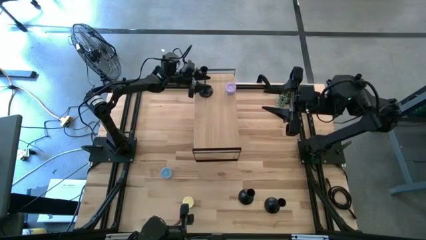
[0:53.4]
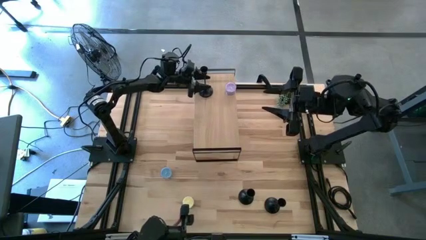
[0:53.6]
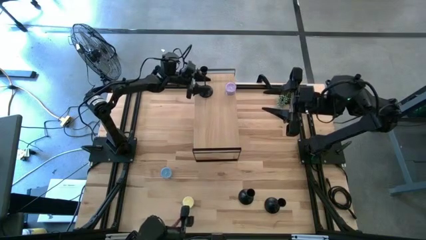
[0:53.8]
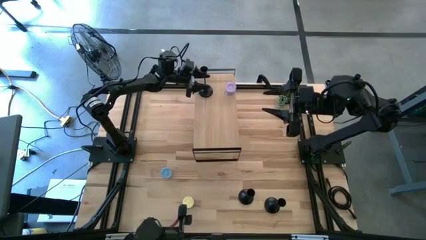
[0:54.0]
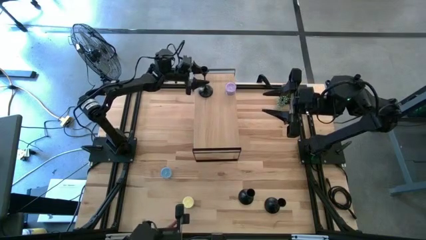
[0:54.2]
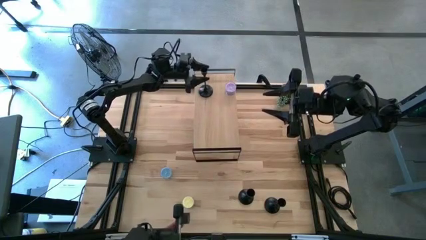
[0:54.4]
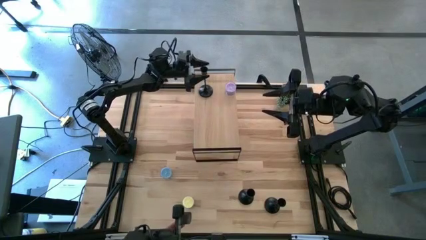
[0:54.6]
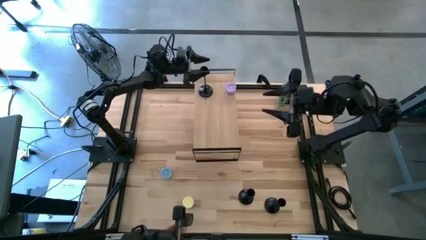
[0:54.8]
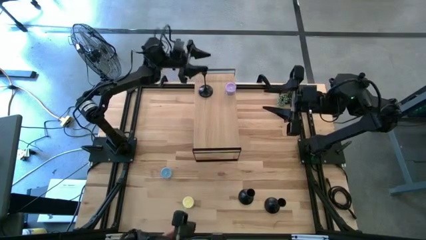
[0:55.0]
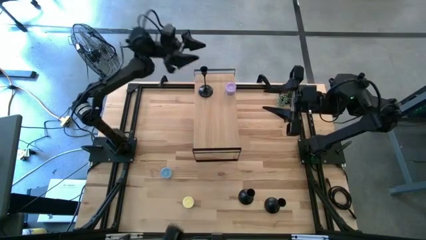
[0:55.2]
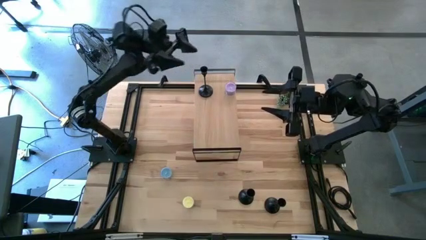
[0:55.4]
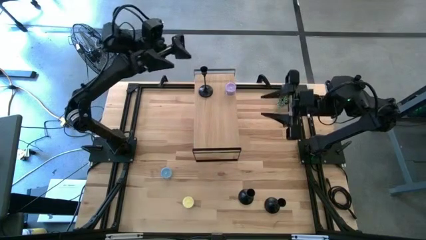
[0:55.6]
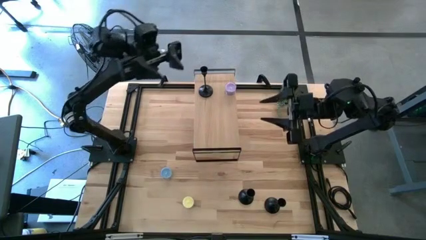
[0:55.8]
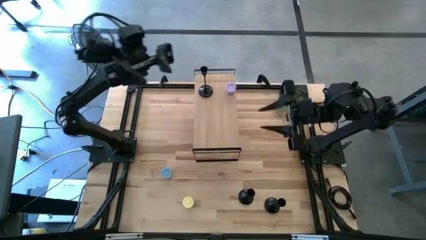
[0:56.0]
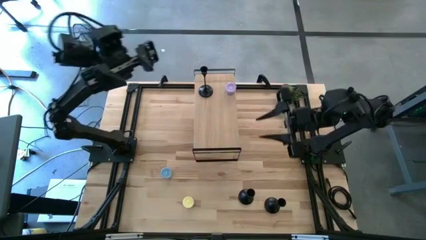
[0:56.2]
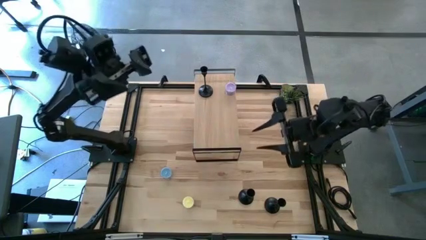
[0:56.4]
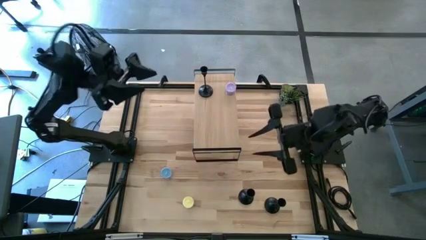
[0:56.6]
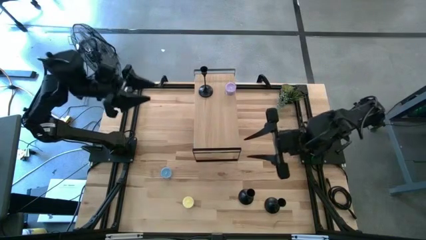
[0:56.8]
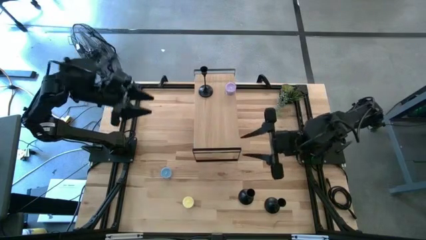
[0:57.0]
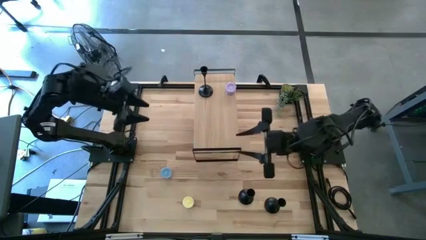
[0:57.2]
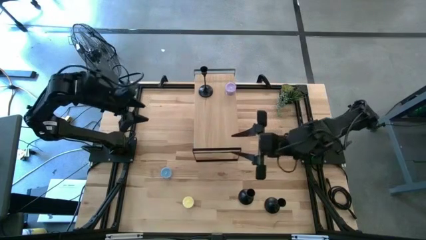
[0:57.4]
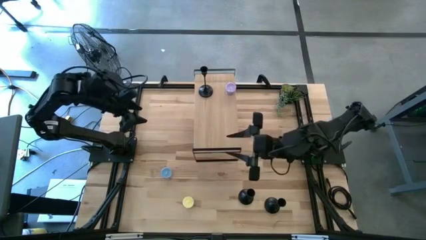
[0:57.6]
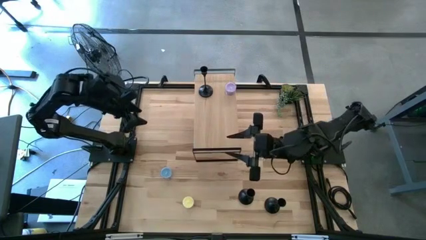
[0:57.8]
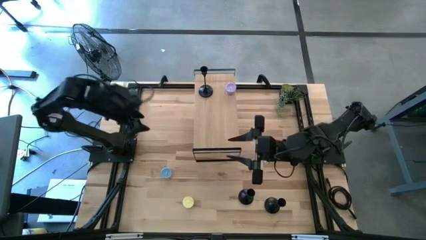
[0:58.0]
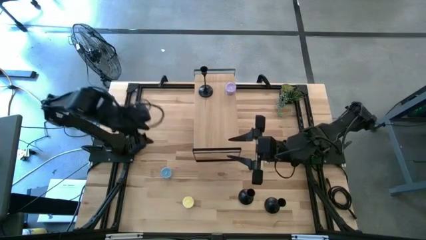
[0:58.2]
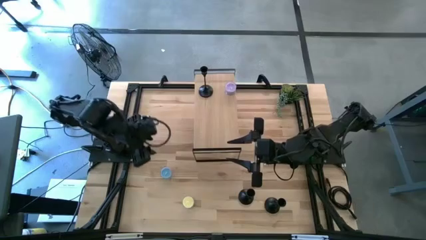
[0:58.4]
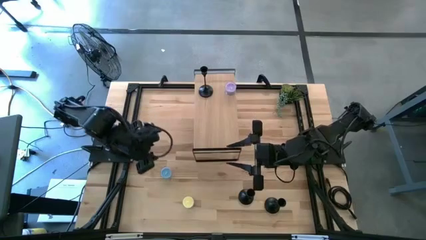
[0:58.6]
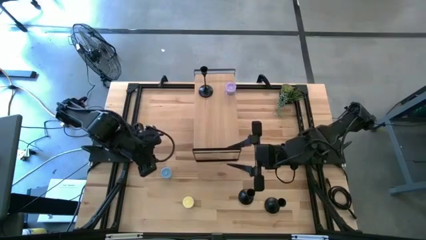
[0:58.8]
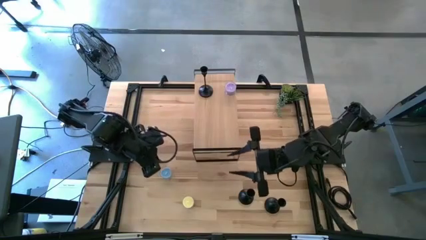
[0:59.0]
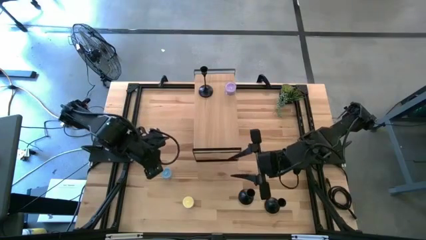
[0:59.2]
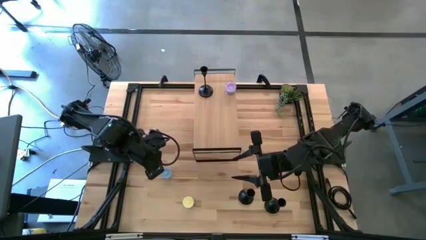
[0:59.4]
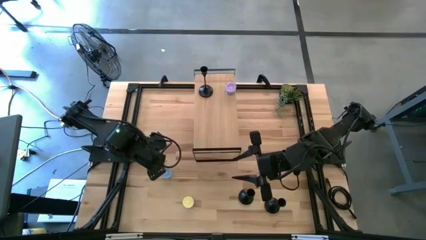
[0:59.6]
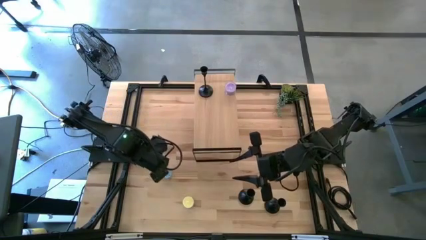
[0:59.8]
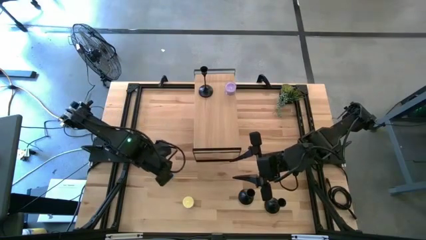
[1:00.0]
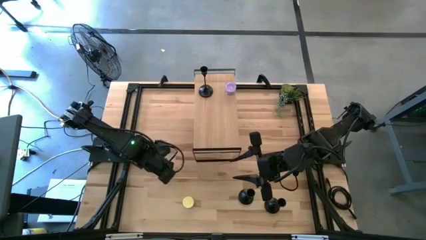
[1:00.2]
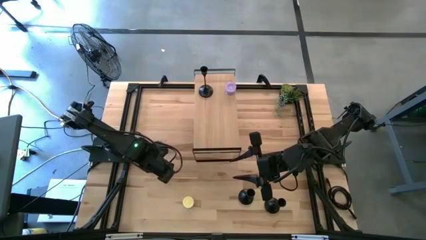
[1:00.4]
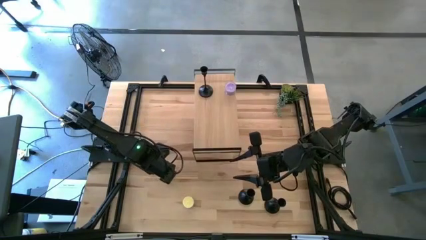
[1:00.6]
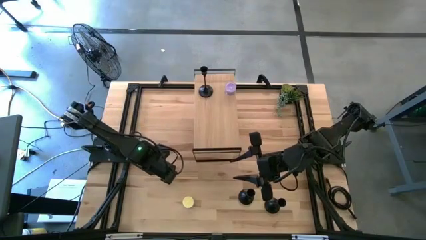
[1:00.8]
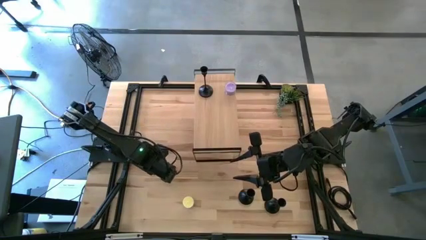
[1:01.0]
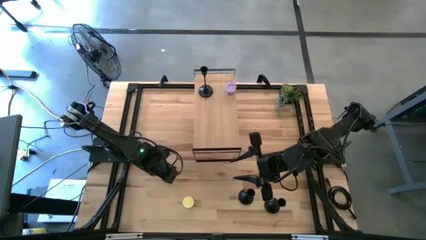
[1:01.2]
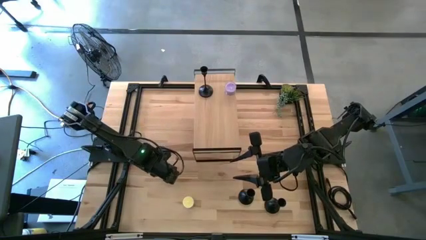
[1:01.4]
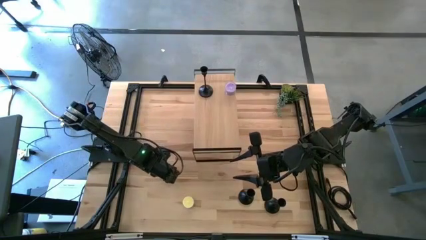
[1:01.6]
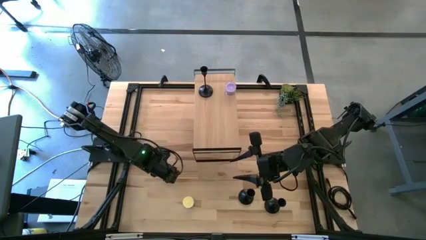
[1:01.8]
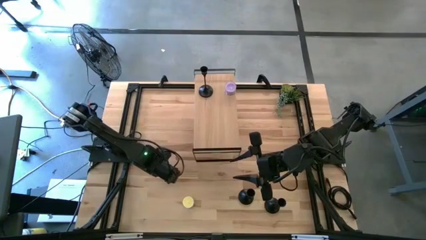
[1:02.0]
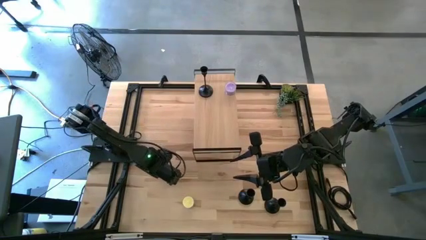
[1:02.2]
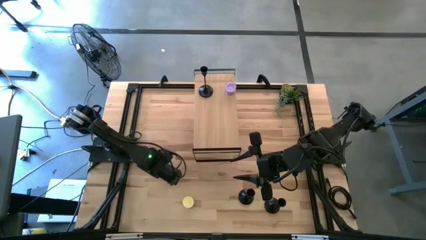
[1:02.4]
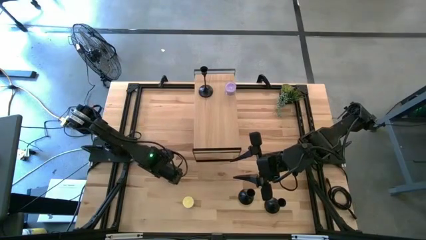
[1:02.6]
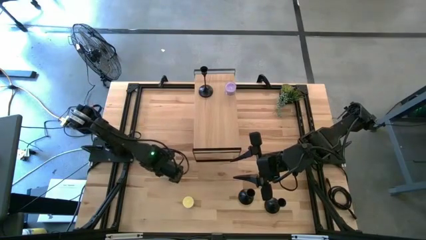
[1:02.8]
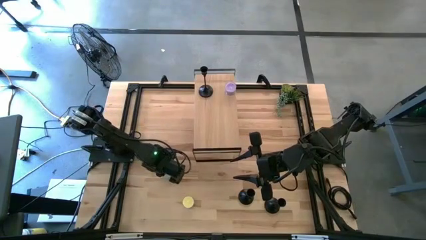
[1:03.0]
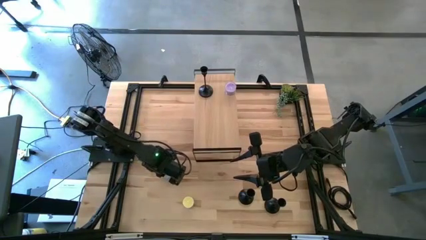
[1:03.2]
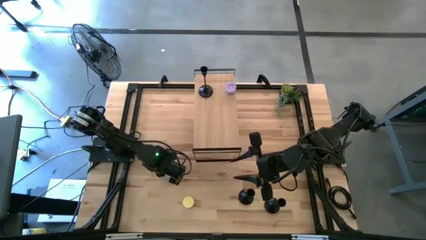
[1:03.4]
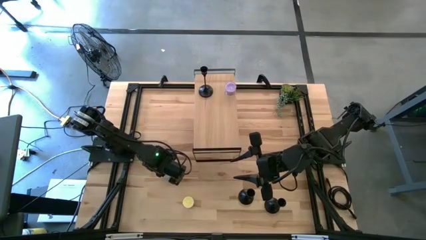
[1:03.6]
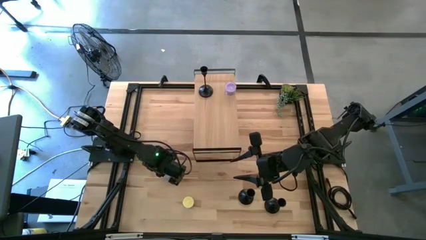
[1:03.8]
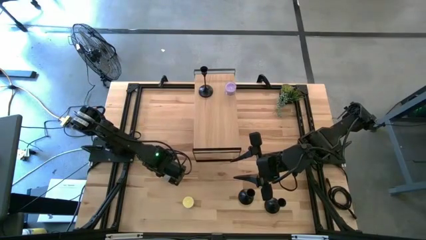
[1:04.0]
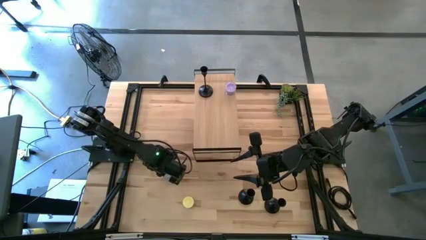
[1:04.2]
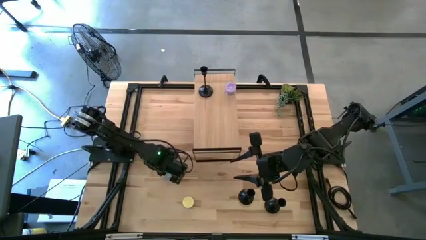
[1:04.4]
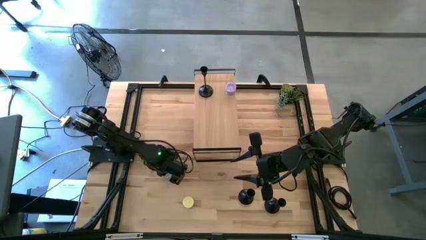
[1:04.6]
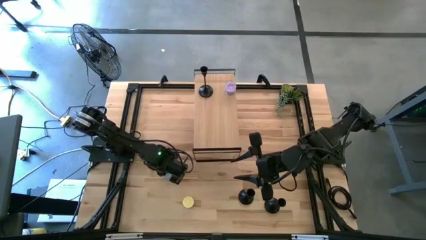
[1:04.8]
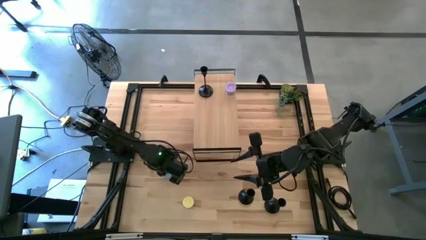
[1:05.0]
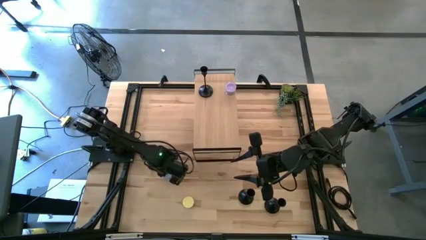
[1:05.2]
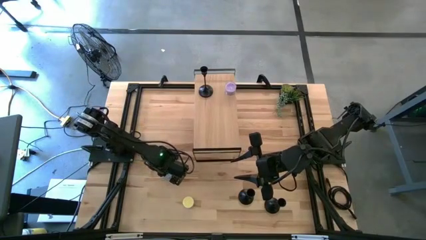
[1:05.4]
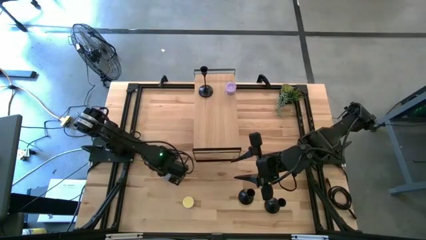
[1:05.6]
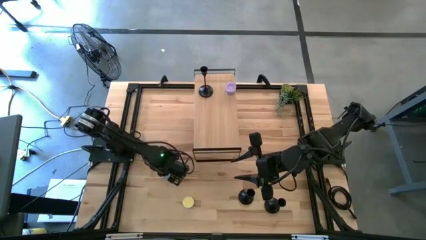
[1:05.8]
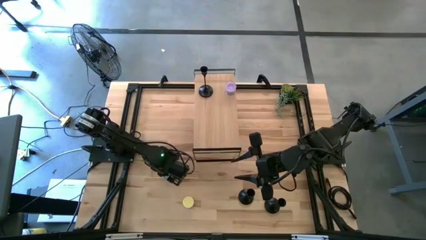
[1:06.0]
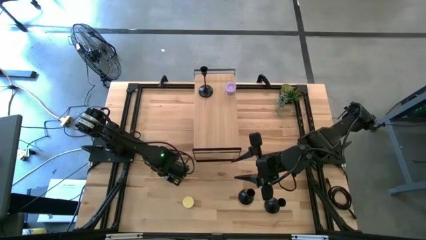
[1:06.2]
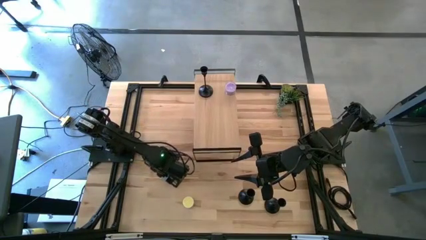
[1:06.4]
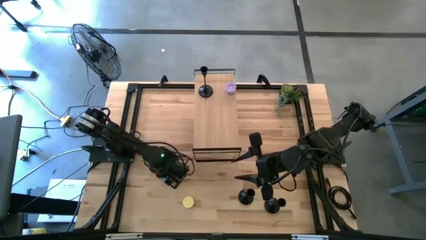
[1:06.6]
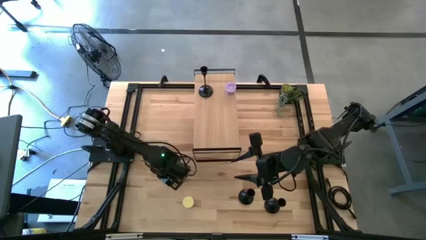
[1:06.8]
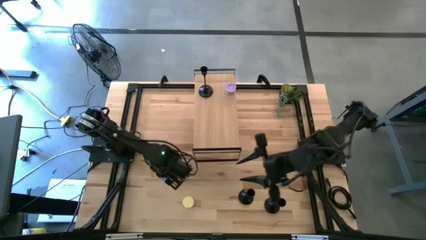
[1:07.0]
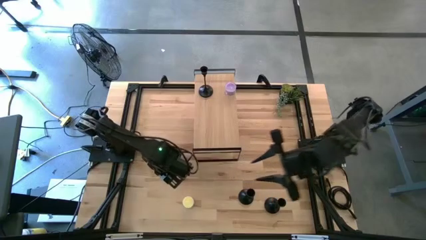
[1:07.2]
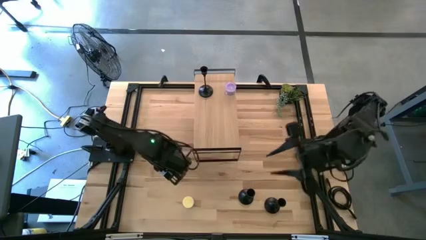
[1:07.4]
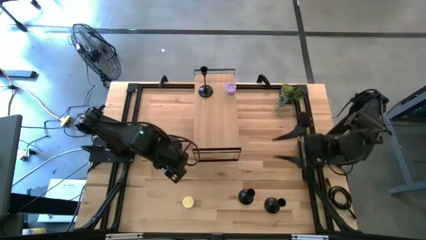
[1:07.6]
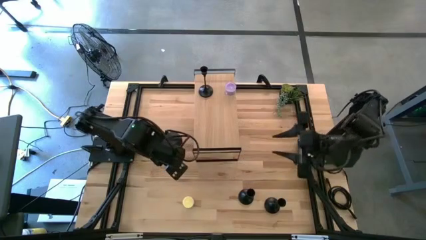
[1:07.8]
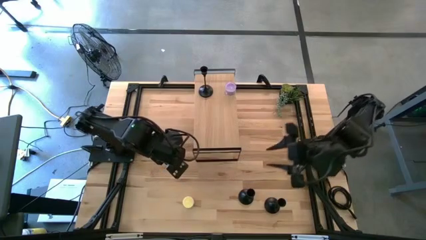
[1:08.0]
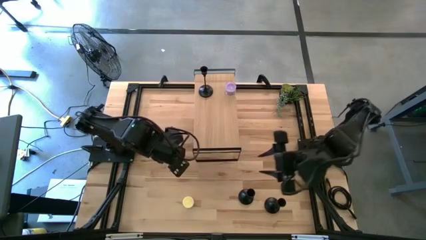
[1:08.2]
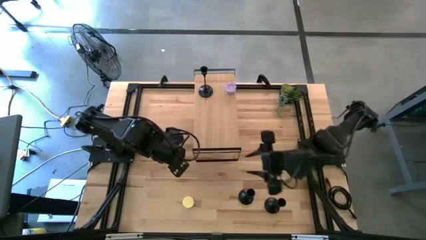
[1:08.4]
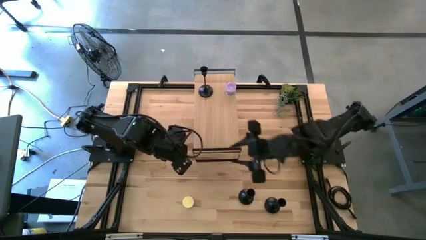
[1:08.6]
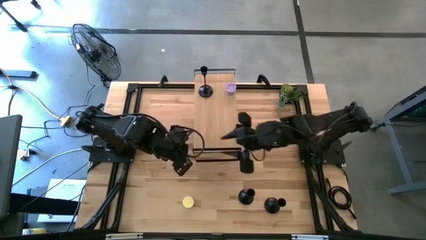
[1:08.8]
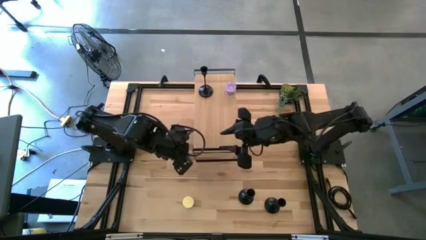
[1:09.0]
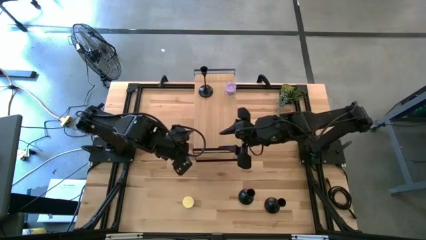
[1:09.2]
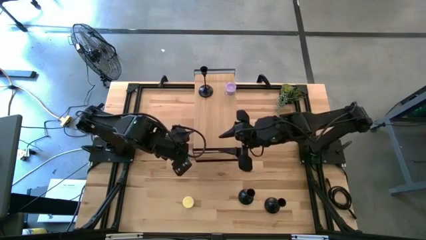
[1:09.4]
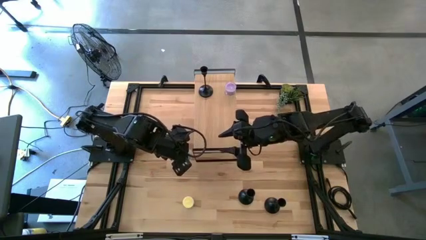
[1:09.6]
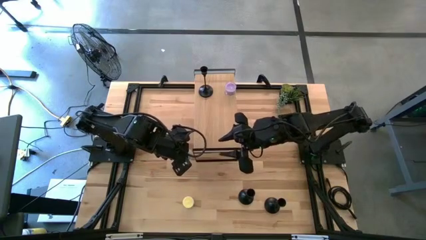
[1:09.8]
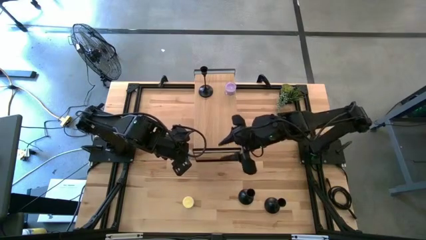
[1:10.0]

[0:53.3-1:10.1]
Task: Pick & Place candle stick holders
Put the blue scented candle on the shelf
